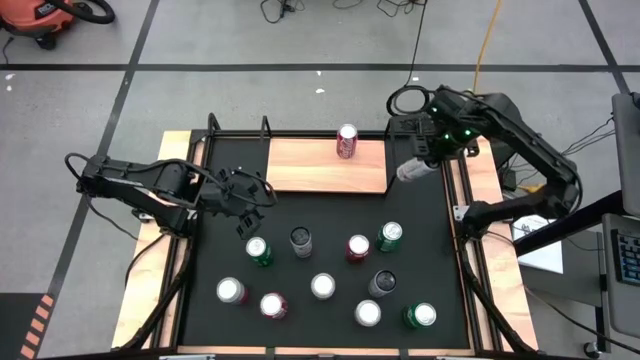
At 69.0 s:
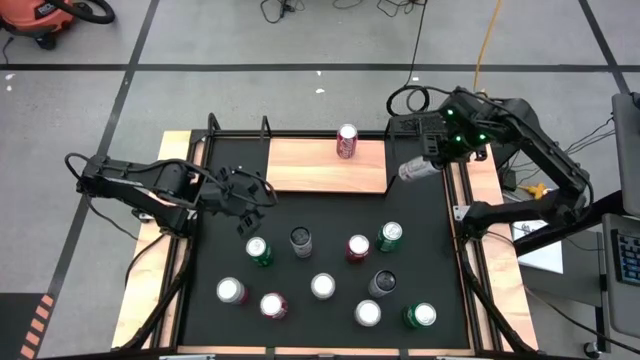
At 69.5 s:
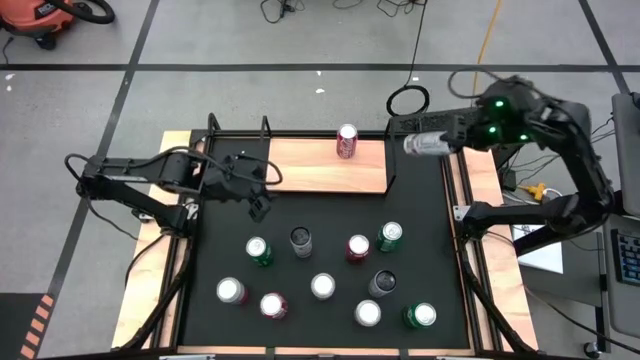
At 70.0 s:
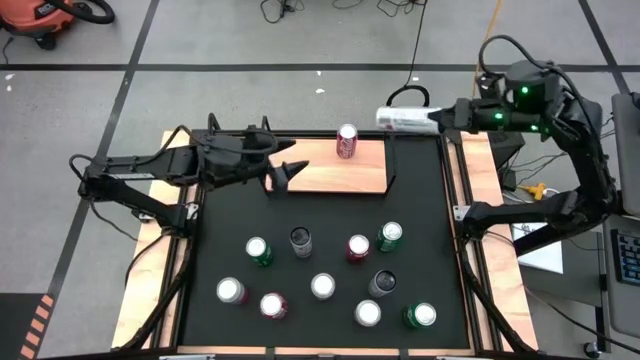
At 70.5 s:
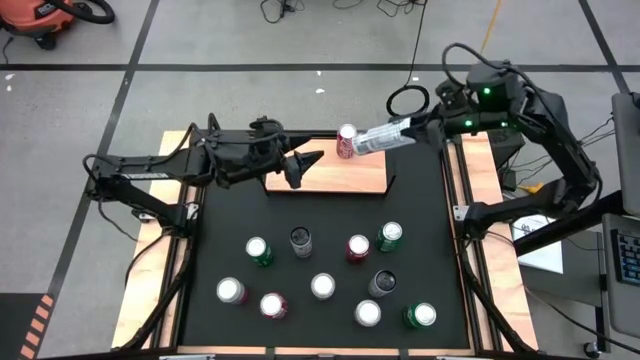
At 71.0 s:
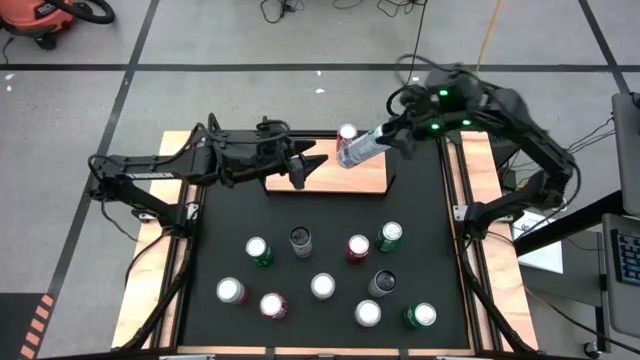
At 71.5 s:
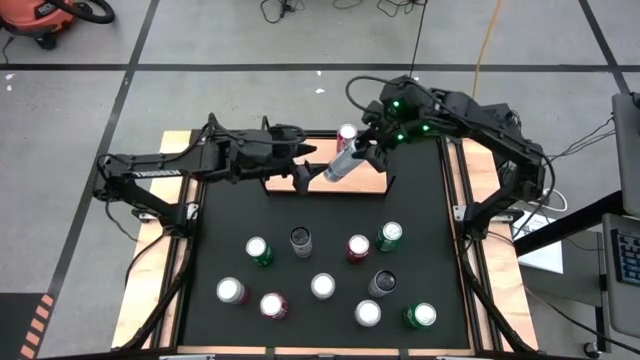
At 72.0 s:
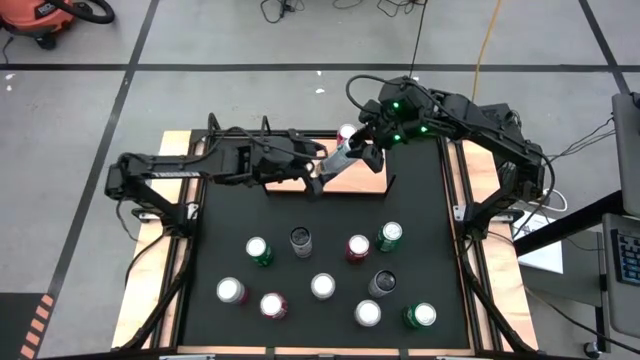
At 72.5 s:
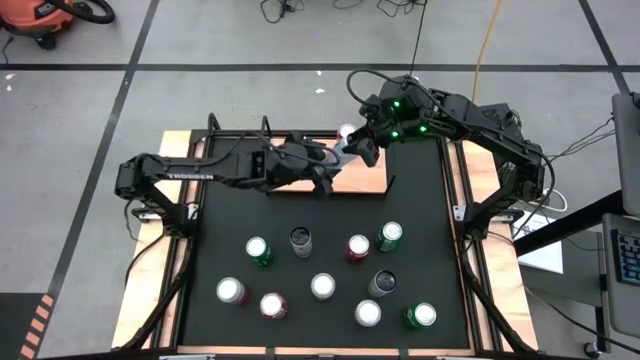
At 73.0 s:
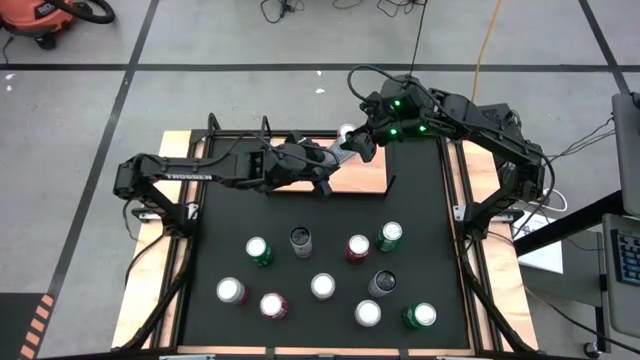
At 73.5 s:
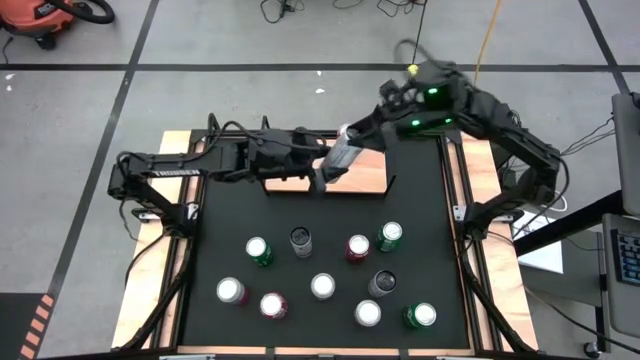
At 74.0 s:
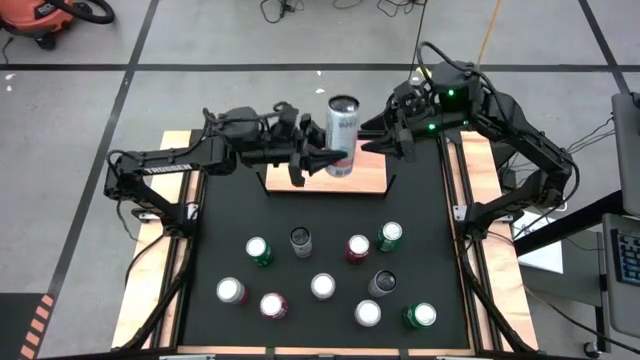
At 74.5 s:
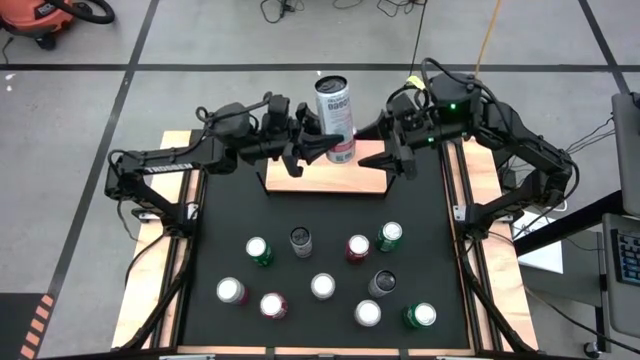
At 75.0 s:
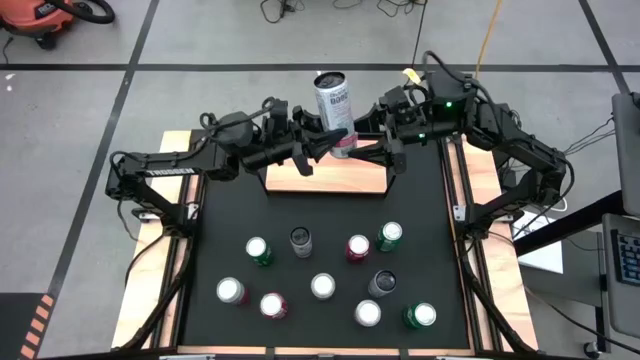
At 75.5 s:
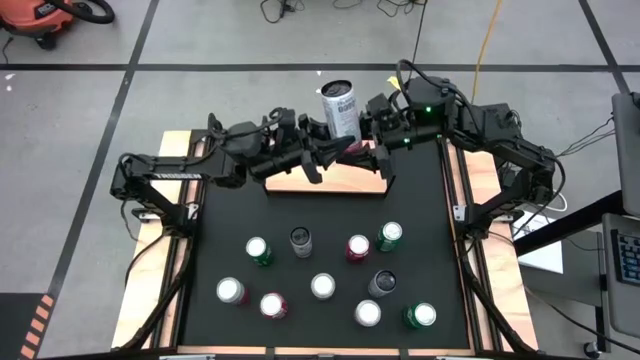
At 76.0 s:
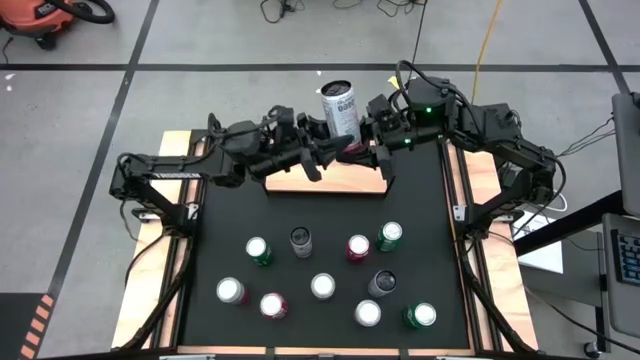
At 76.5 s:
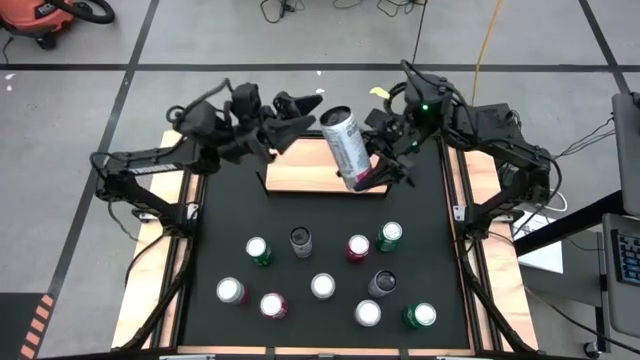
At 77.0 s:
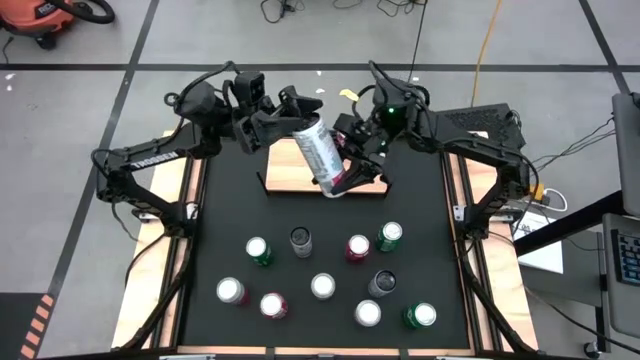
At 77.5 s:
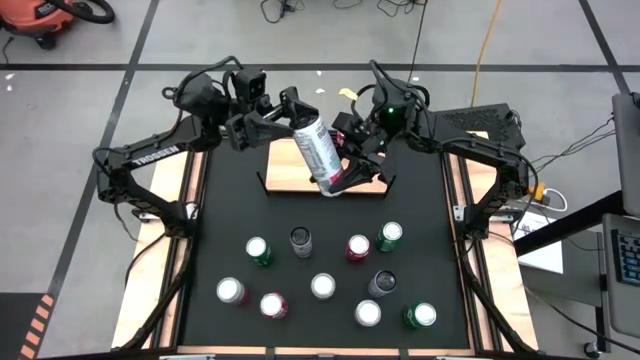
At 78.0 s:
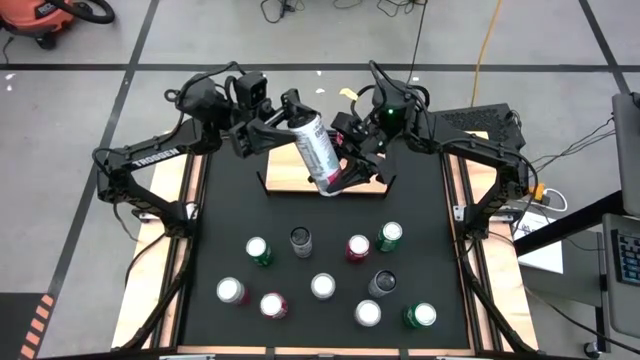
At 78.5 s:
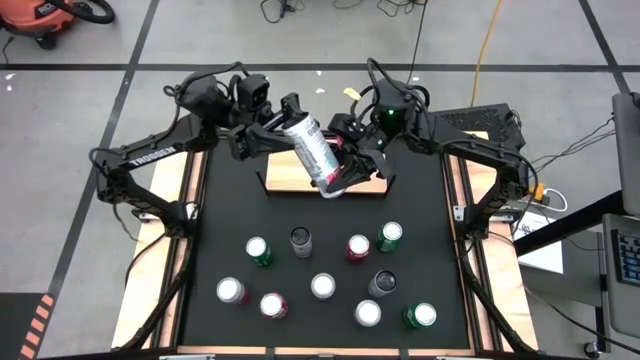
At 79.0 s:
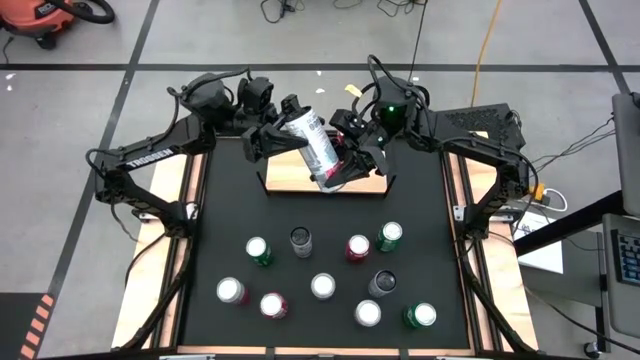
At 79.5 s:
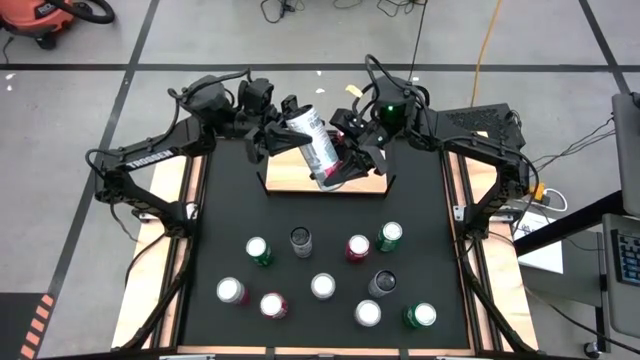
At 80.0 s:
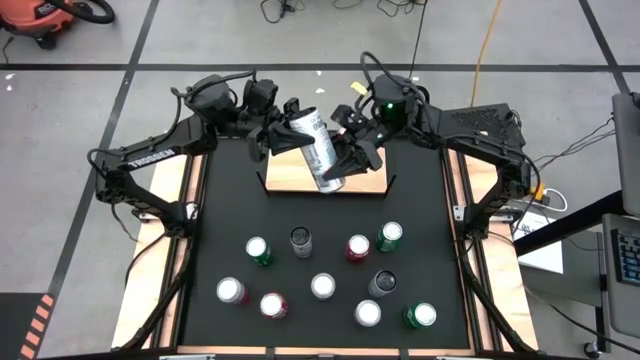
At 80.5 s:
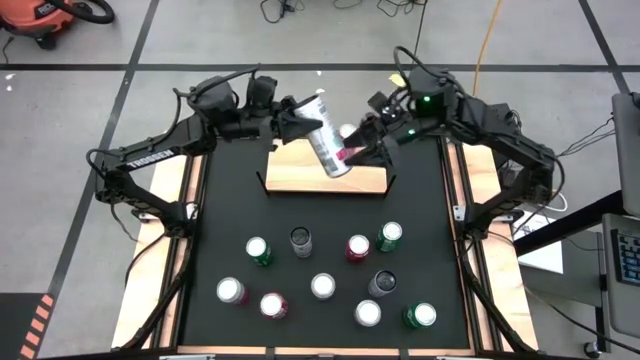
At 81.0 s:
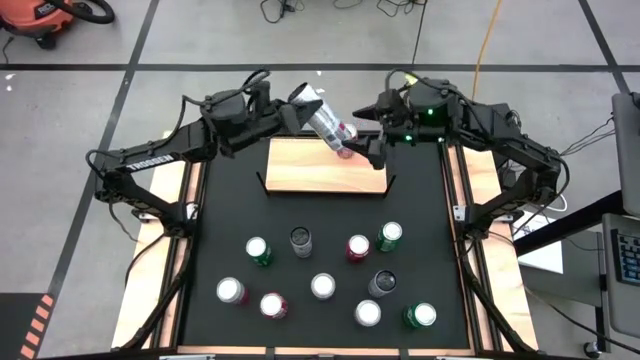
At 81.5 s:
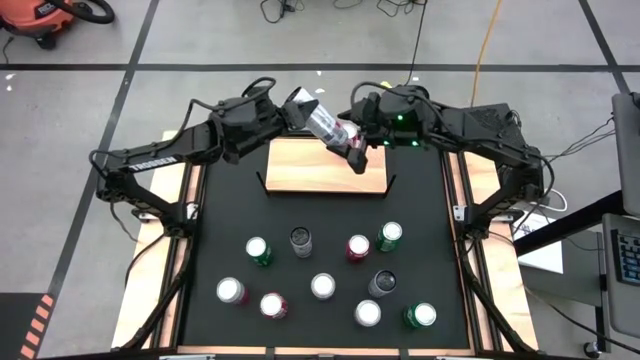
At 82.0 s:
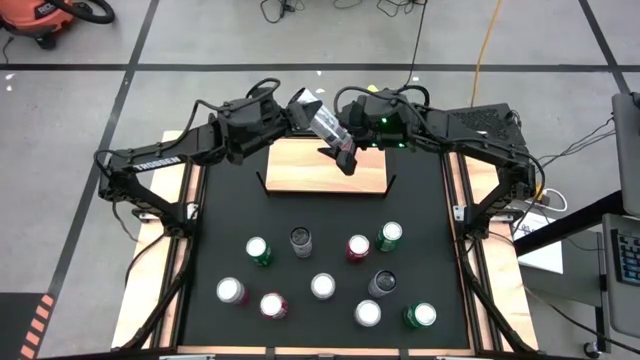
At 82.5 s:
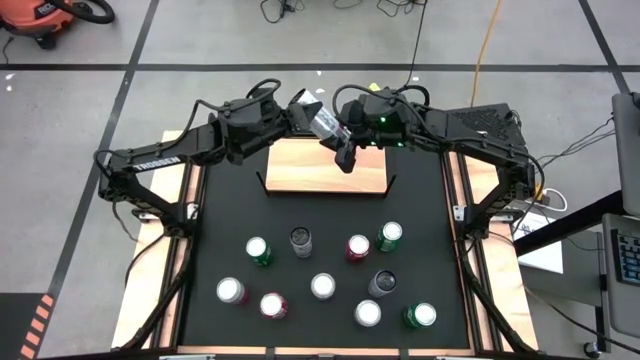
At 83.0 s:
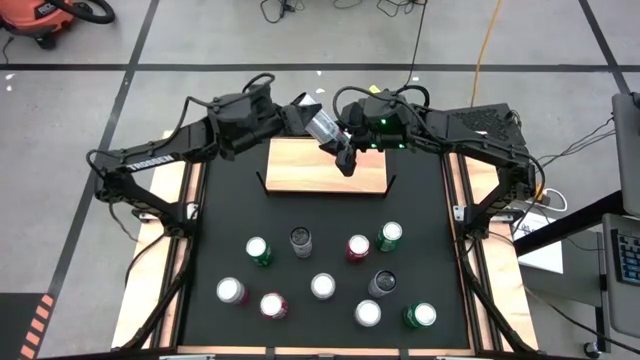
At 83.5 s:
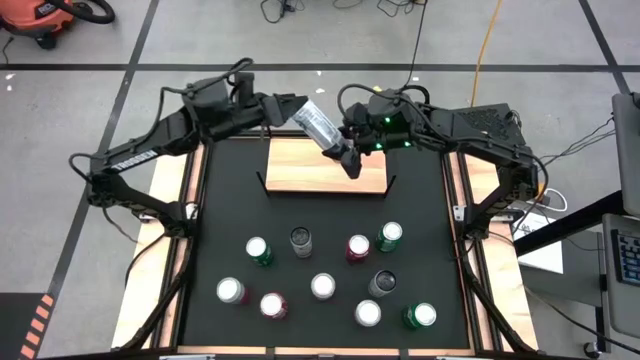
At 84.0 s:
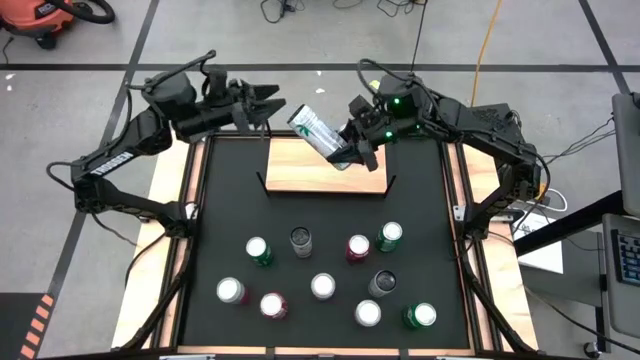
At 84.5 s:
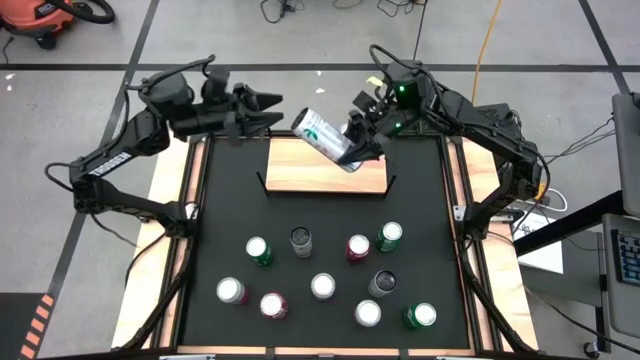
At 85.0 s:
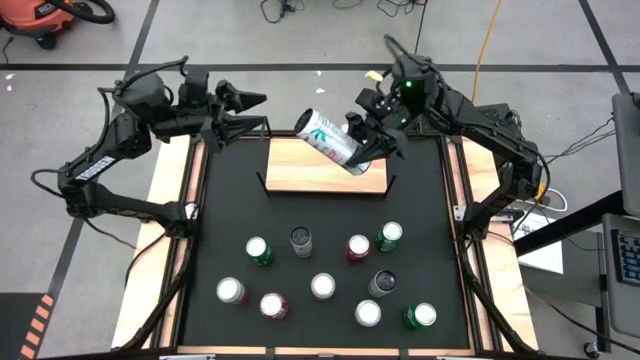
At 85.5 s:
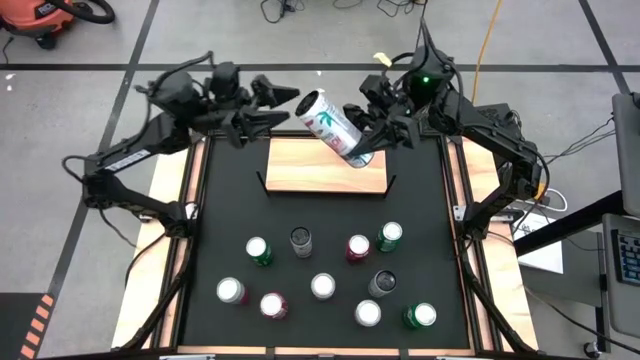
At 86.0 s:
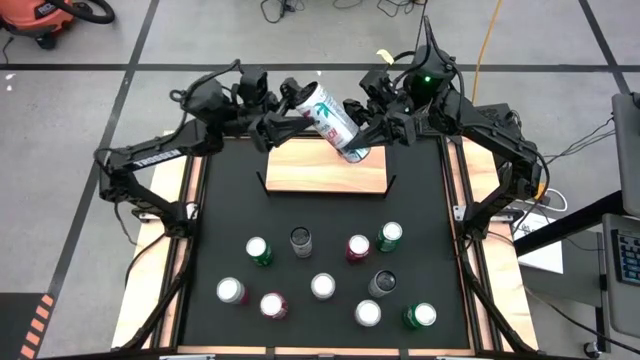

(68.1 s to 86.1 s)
Task: Place canned beverage on shelf
Put the top right white soda can on the shelf

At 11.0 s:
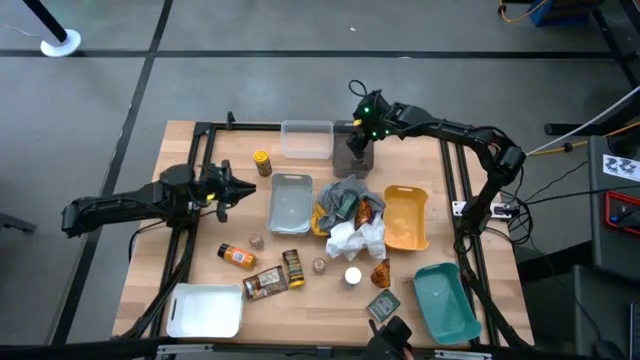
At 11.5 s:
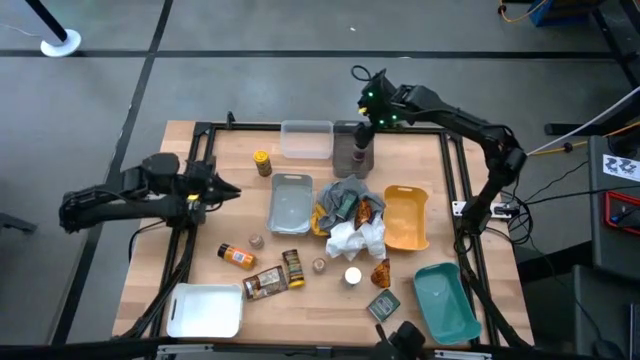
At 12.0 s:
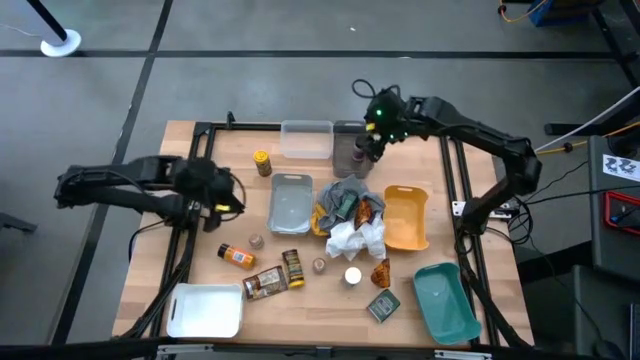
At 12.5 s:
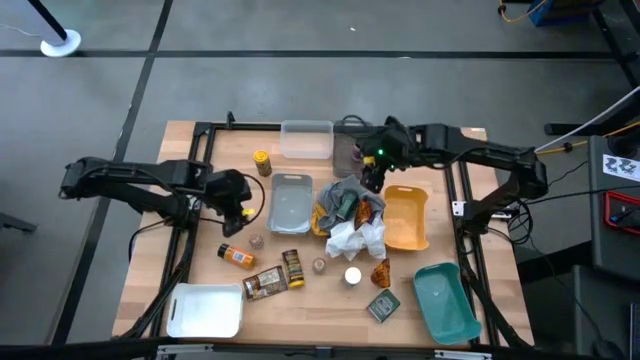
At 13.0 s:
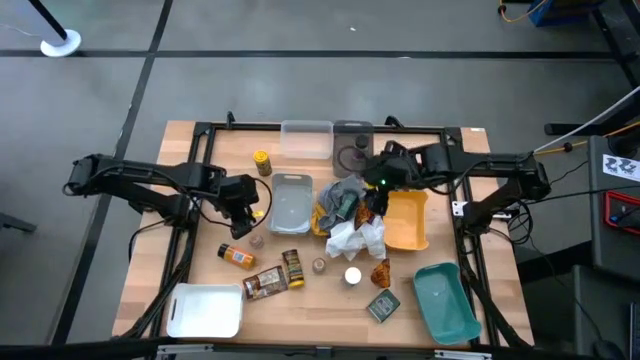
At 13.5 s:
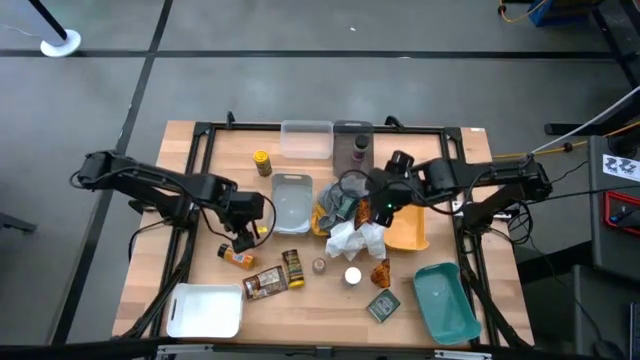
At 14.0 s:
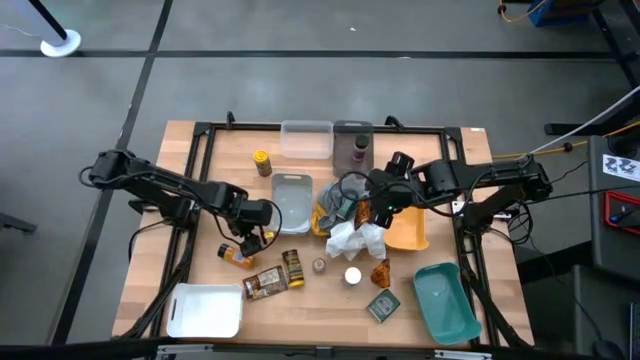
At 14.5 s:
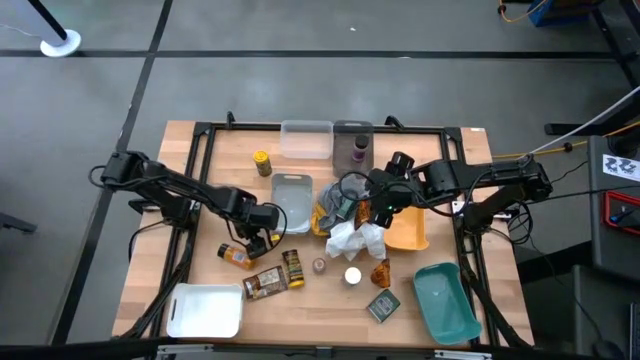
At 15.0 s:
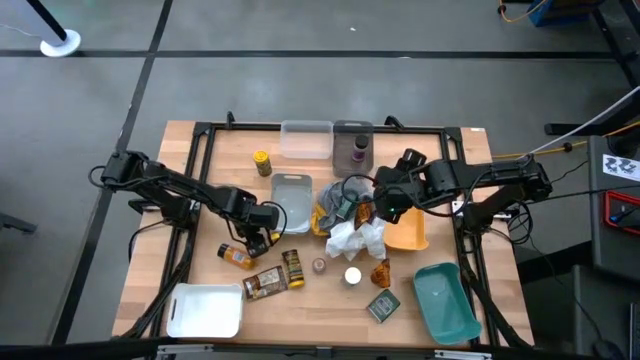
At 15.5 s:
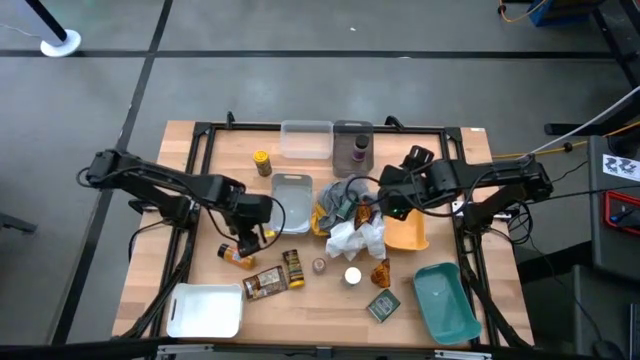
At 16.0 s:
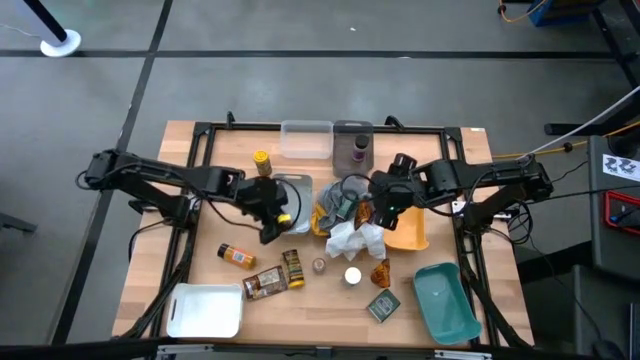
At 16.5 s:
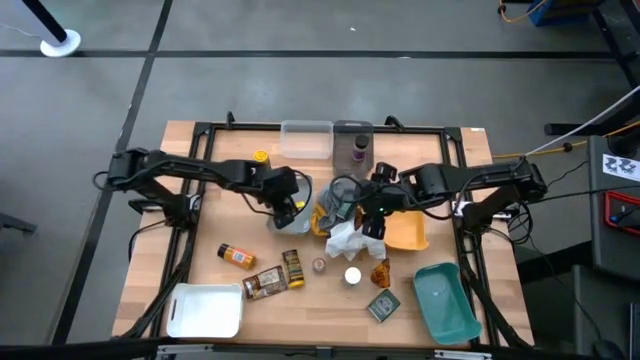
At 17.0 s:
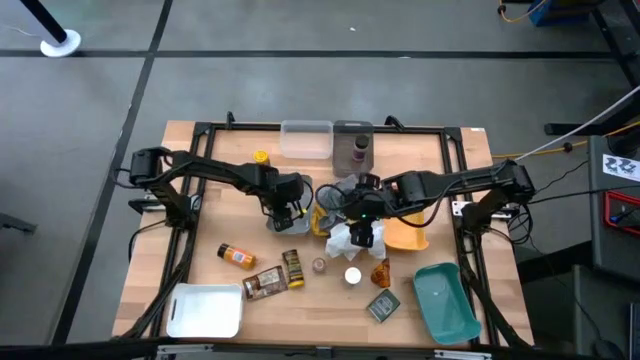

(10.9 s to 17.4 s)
Task: Sort spices by type
Put the left brown seasoning bottle into the gray bin
